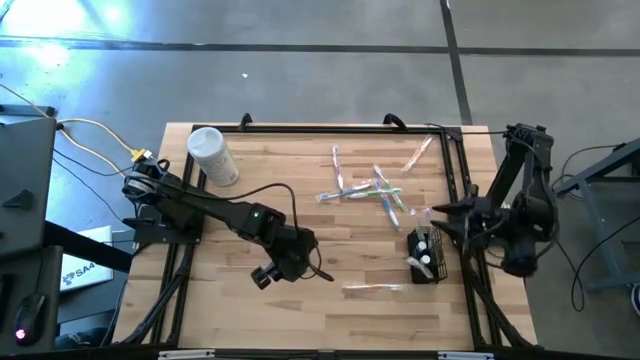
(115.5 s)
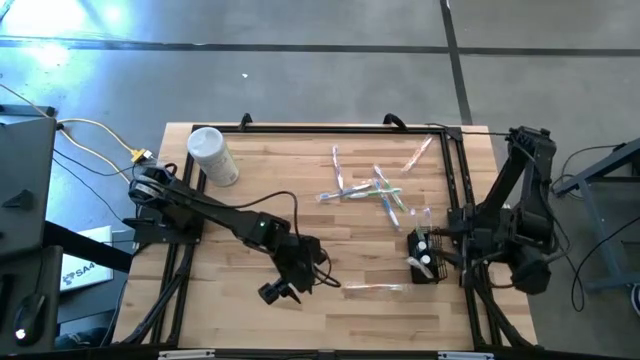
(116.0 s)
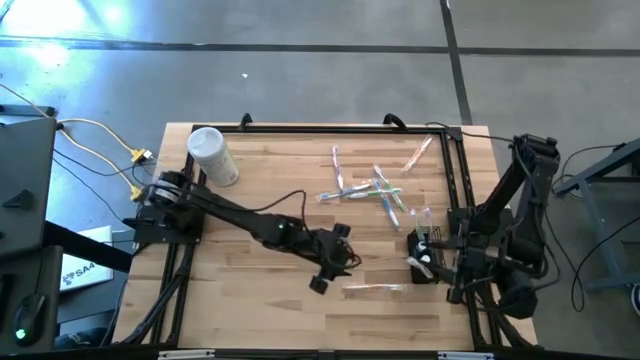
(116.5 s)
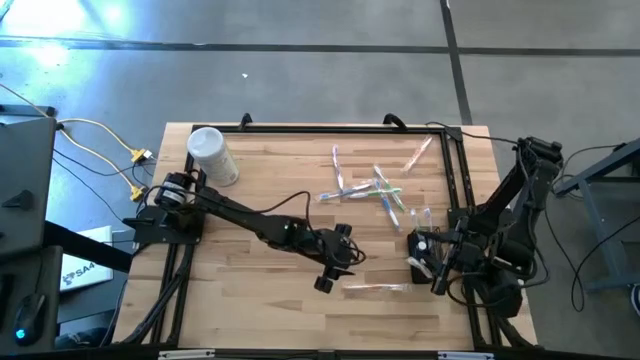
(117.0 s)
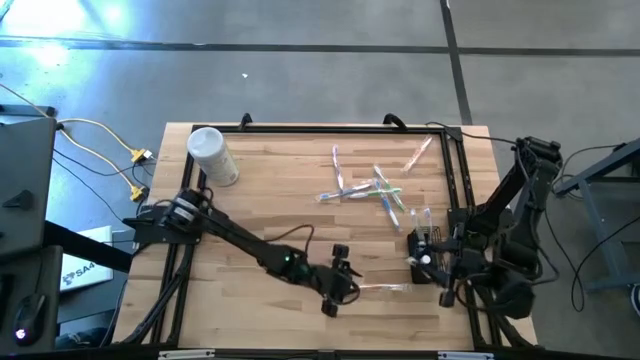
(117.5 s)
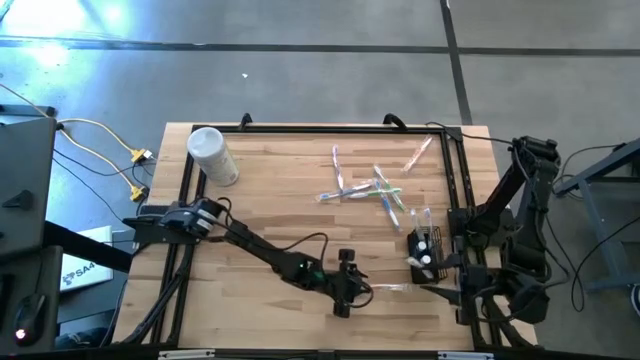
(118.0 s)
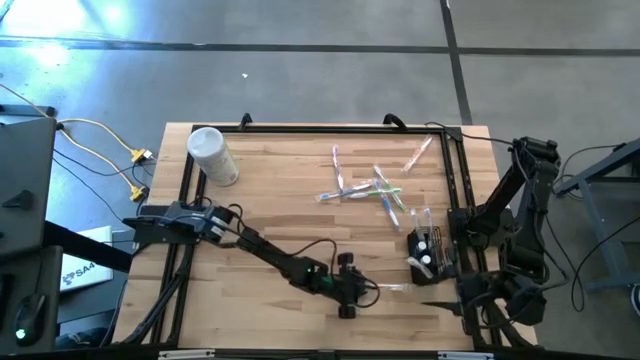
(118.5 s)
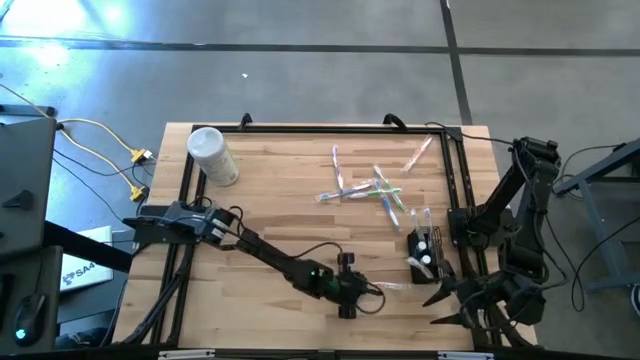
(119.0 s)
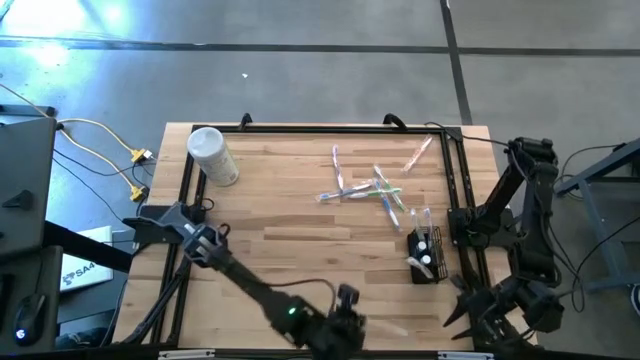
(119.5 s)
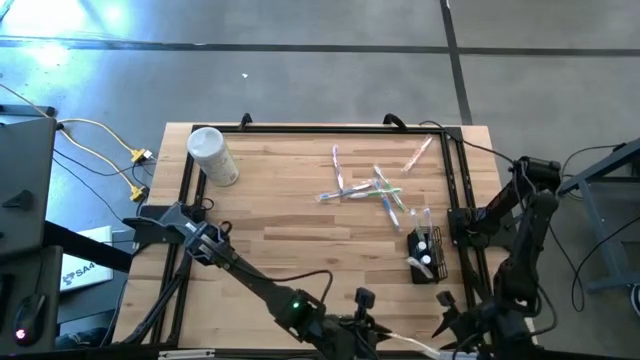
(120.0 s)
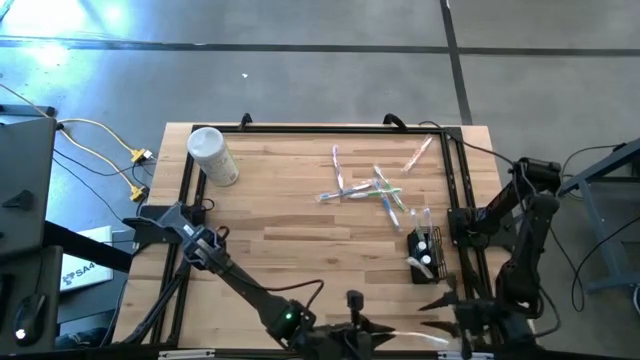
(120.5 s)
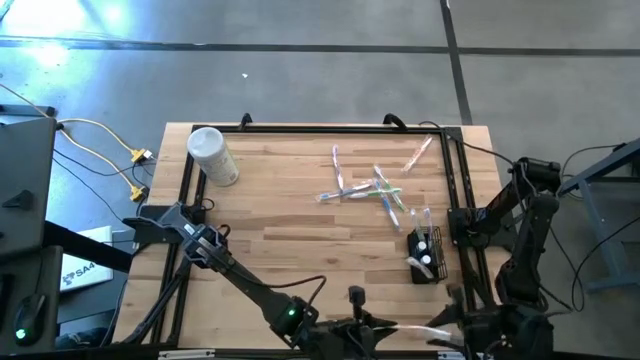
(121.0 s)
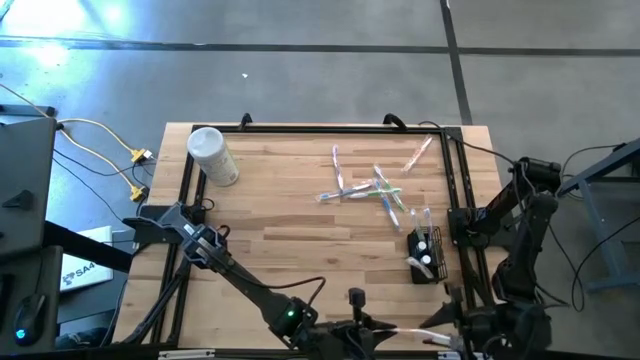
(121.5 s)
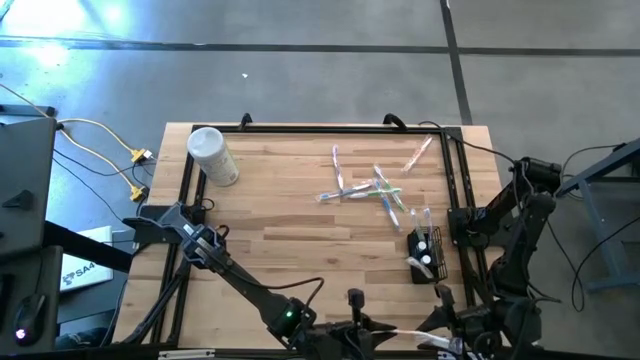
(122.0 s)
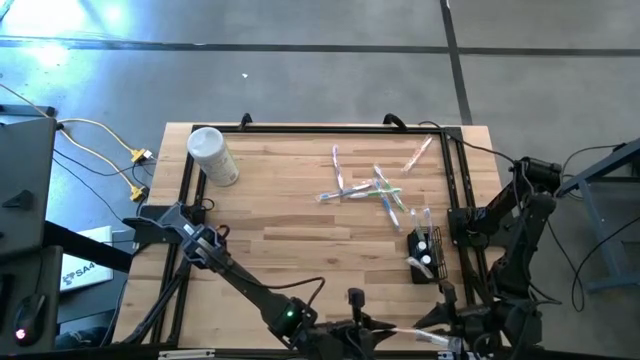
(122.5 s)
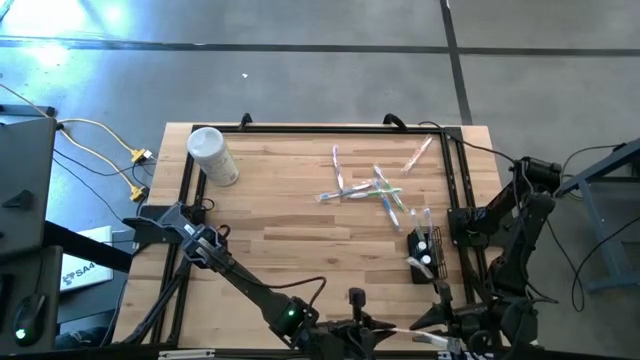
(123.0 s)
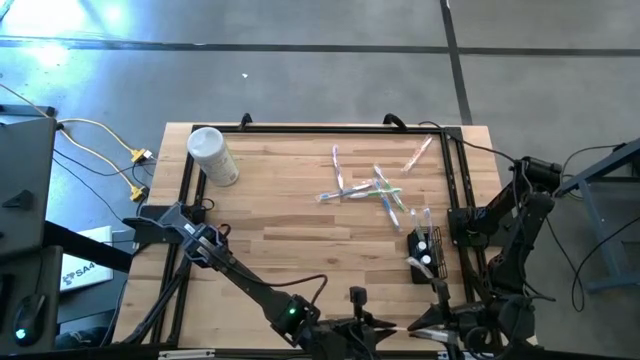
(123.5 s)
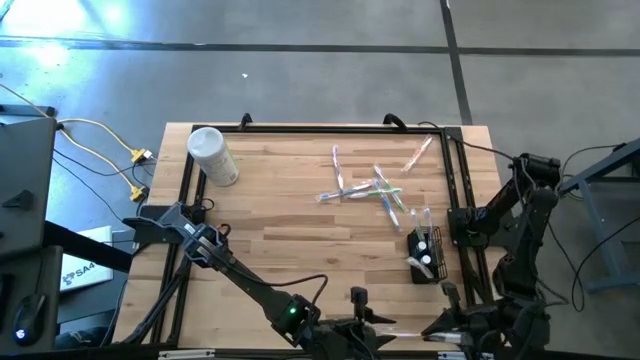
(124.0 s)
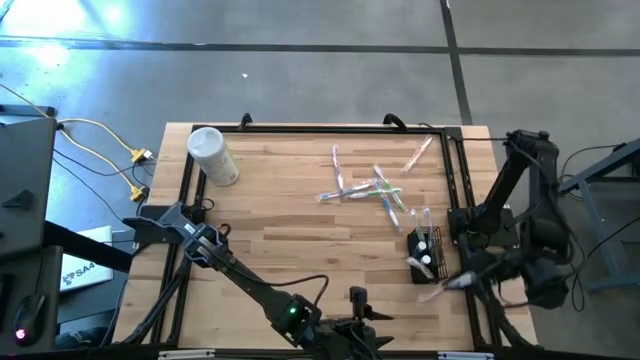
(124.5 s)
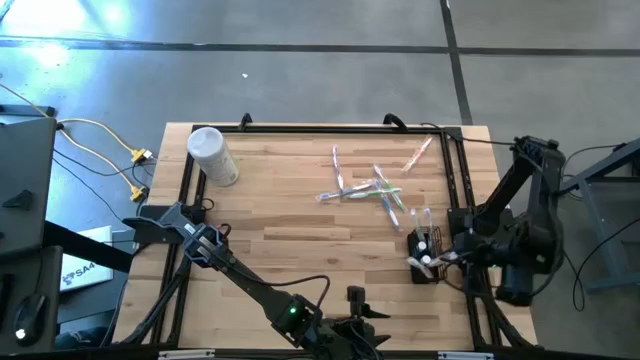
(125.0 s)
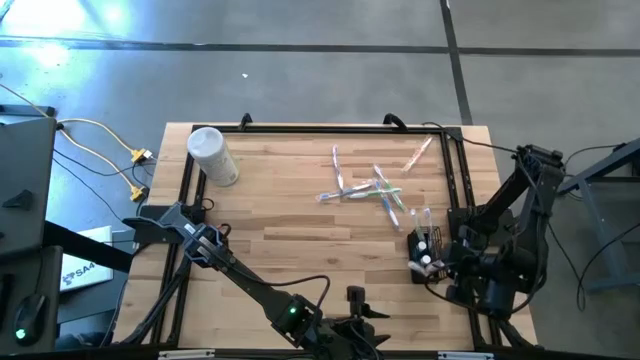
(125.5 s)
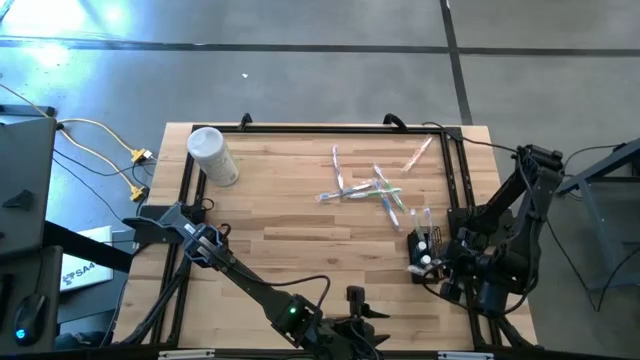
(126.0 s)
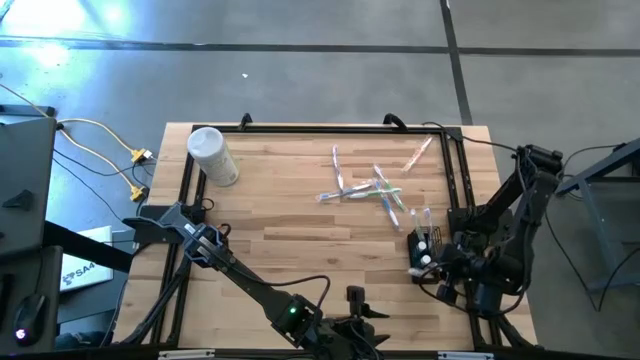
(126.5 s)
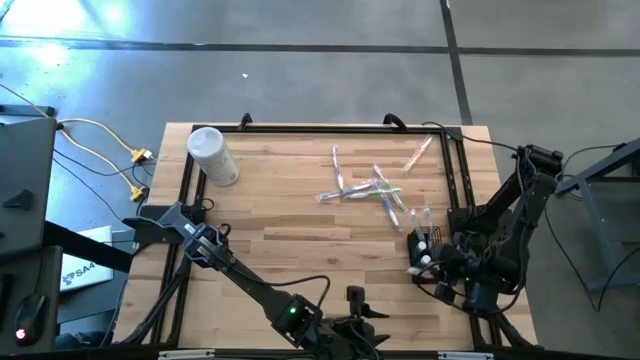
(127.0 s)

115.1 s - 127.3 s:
Task: Pick & Place toothbrushing station
Put the bottom orange toothbrush into the black mesh organizer

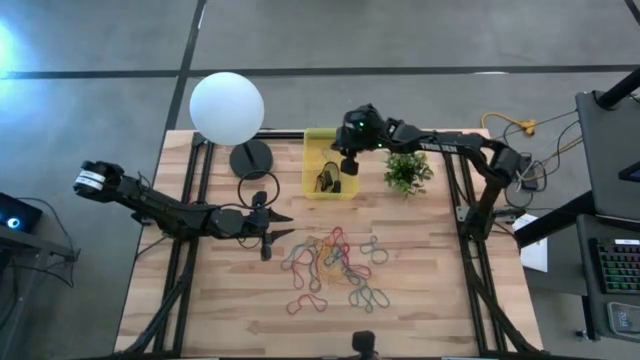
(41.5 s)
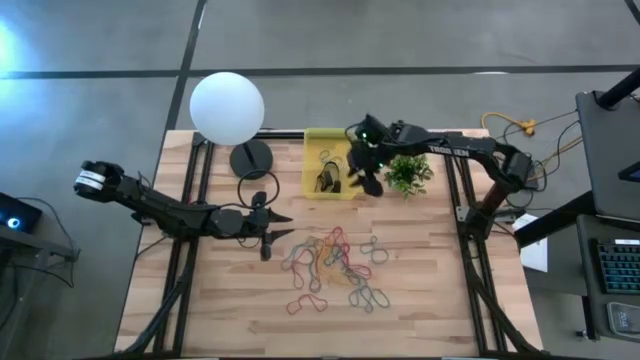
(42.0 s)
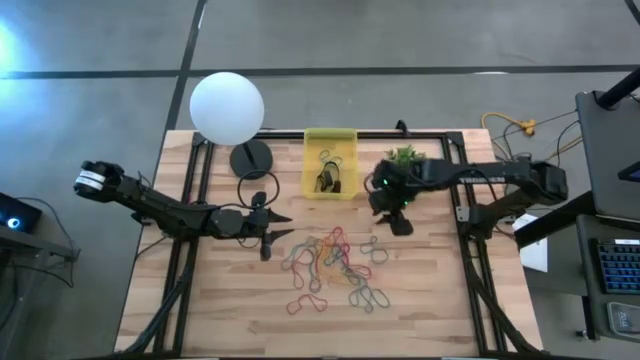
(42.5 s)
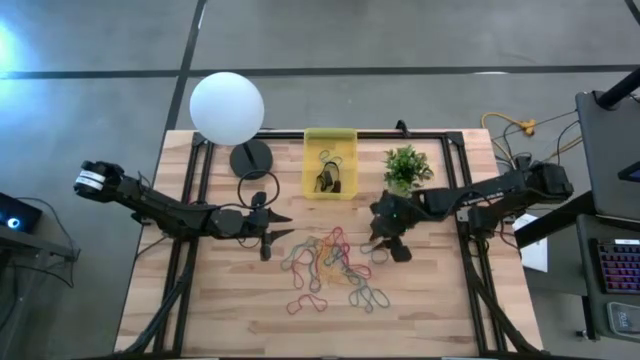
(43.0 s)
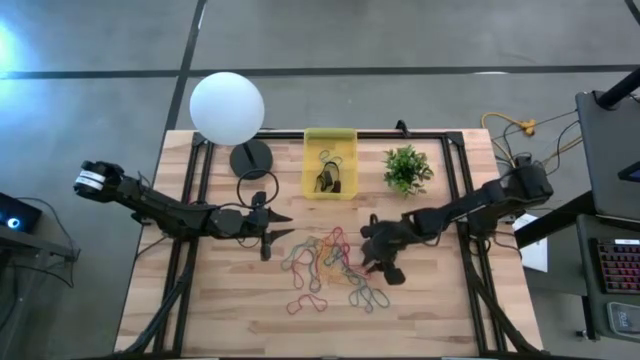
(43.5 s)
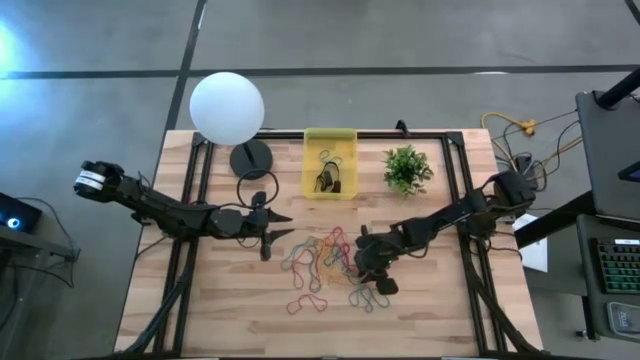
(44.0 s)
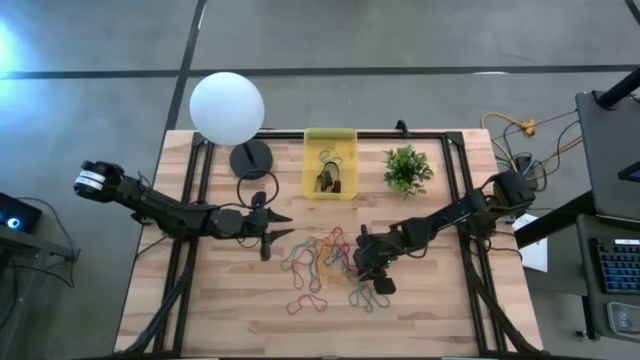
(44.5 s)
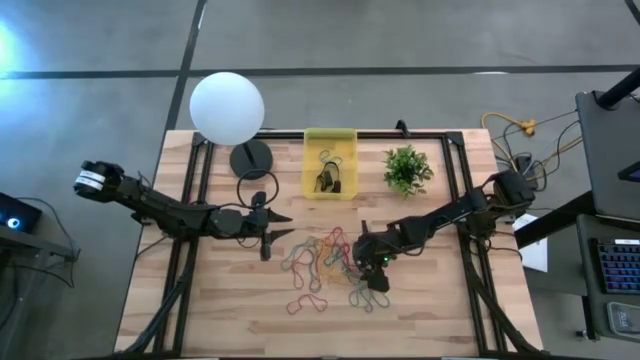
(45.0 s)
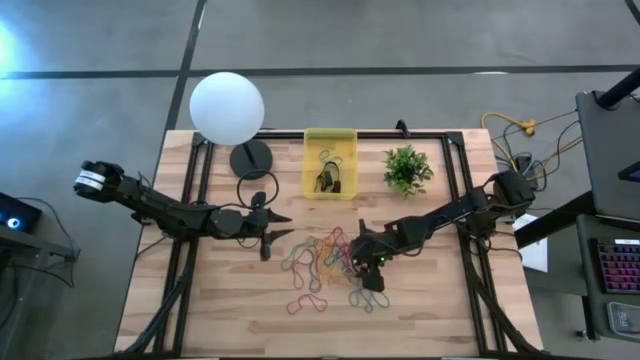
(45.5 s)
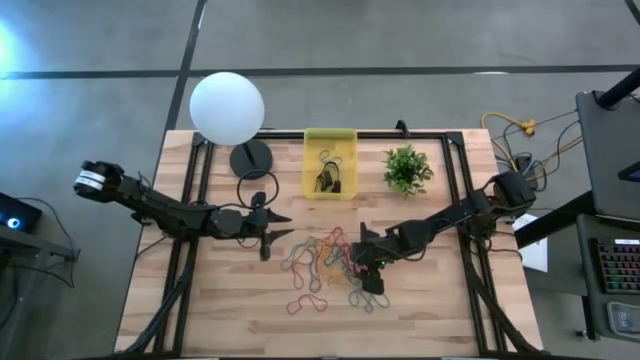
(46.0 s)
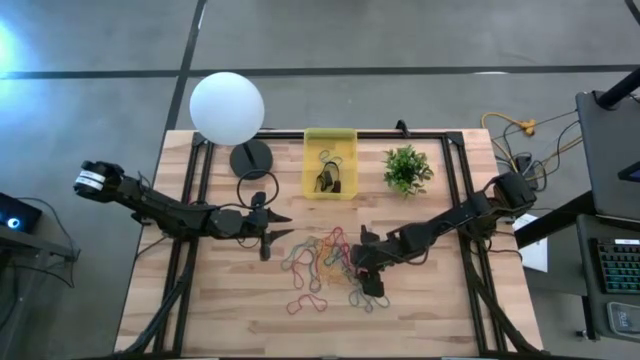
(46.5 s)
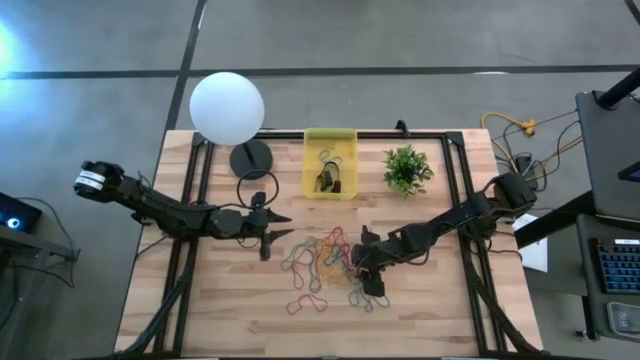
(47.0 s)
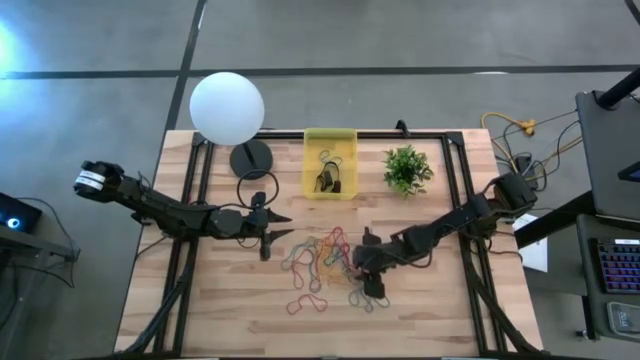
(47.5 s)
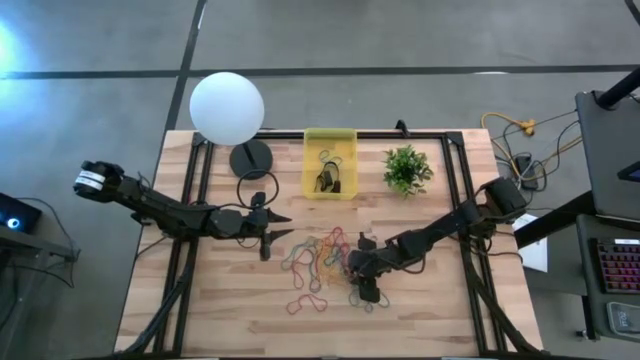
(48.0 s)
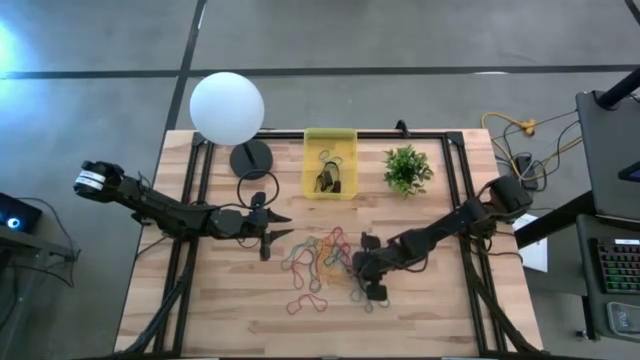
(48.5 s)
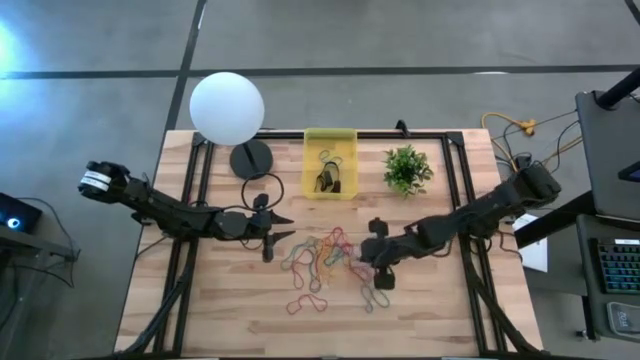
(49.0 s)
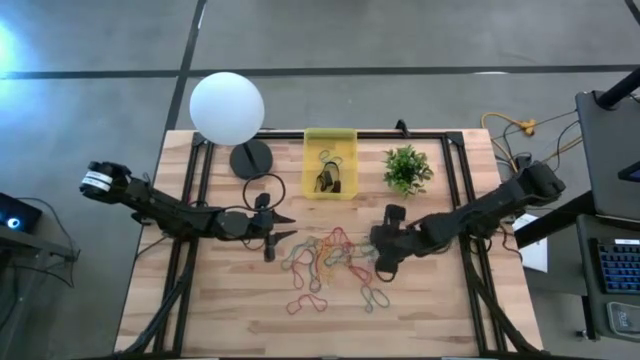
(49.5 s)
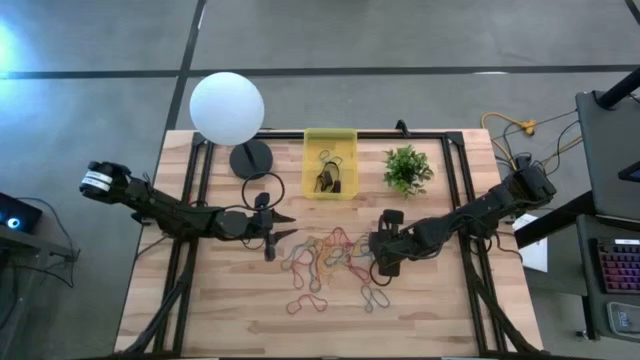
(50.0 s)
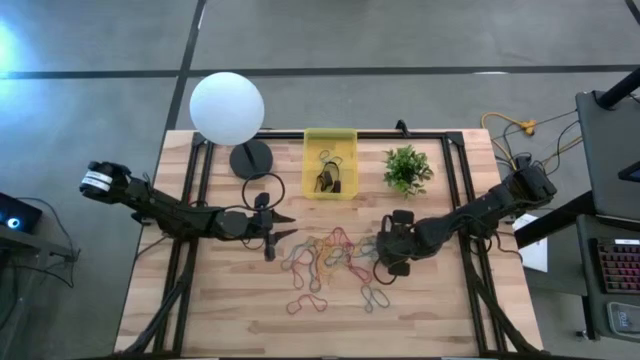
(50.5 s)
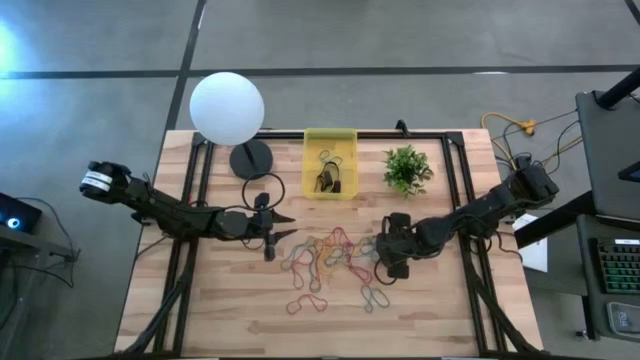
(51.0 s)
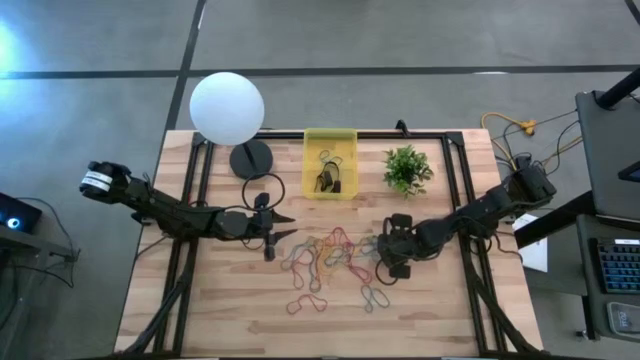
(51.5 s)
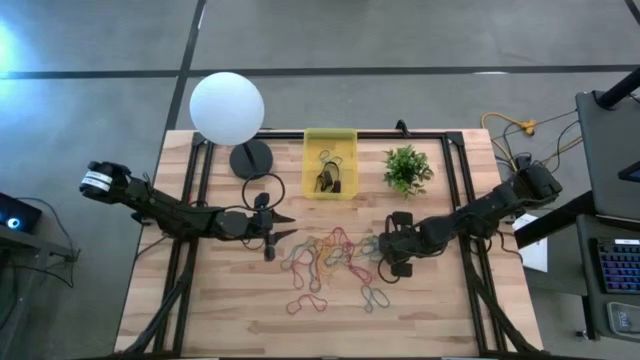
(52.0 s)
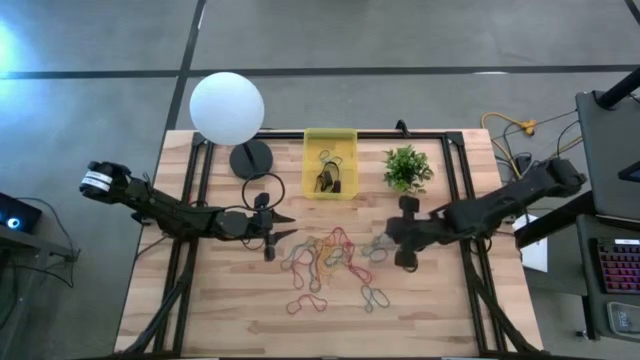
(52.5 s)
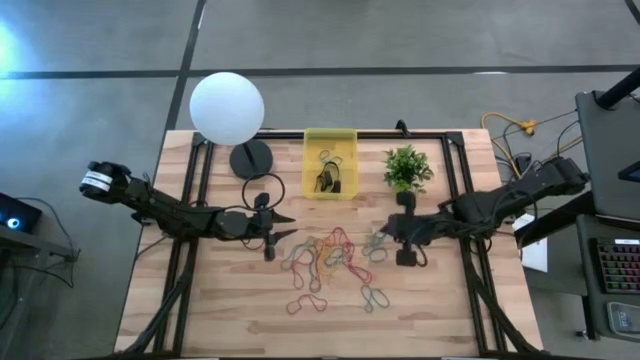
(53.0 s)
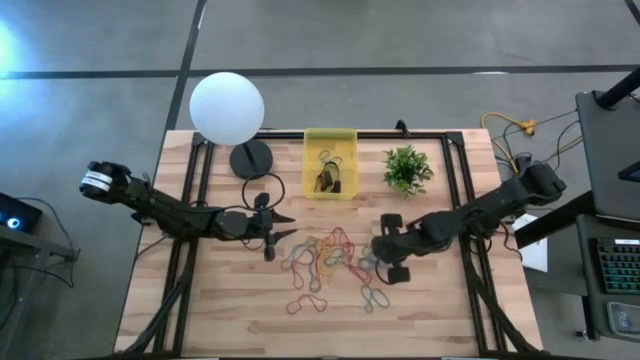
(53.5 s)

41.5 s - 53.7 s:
Task: Pick and place rubber bands into bin
Put the blue rubber band into the yellow bin
